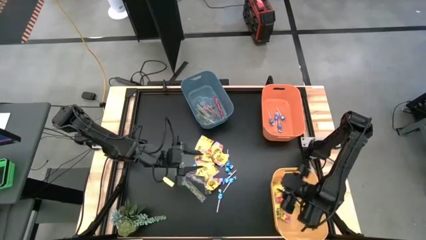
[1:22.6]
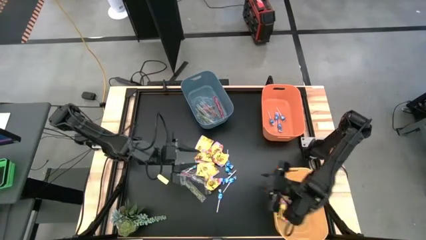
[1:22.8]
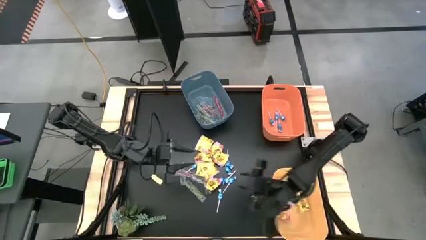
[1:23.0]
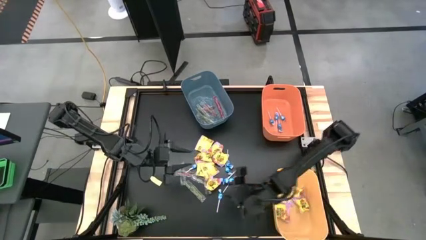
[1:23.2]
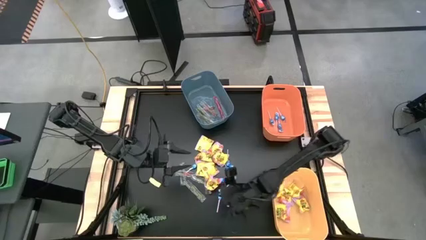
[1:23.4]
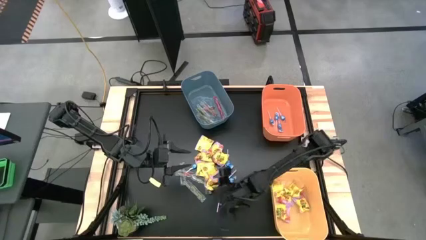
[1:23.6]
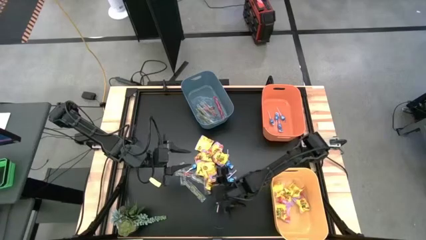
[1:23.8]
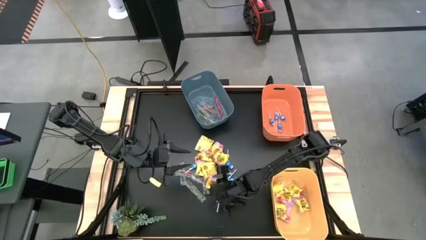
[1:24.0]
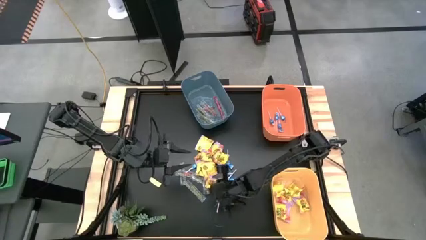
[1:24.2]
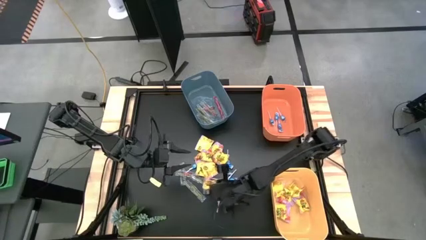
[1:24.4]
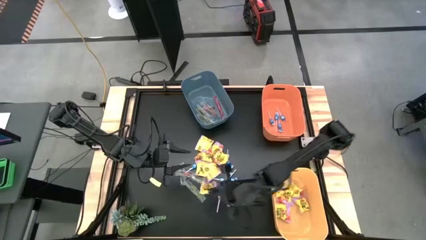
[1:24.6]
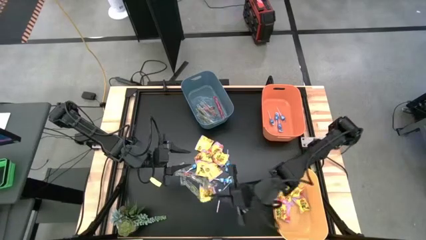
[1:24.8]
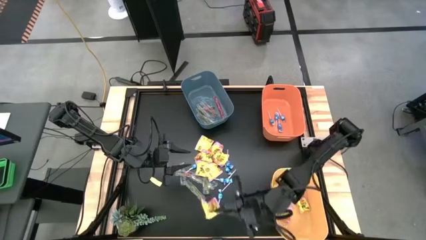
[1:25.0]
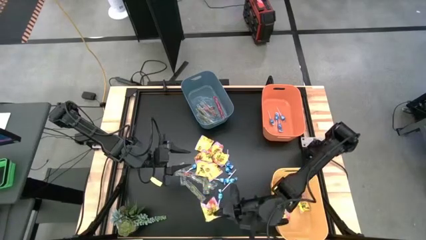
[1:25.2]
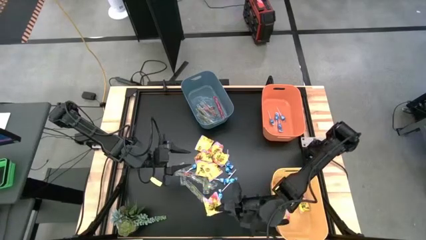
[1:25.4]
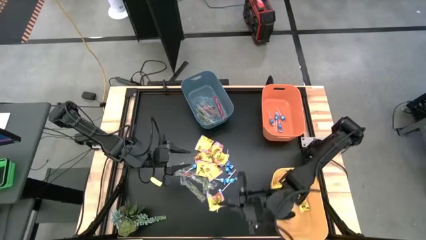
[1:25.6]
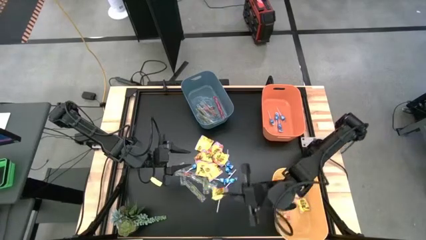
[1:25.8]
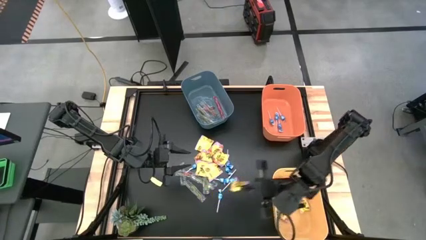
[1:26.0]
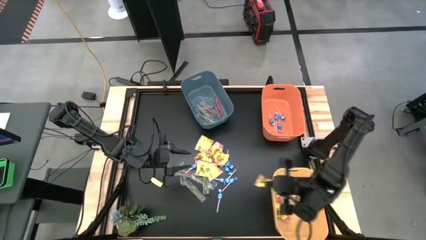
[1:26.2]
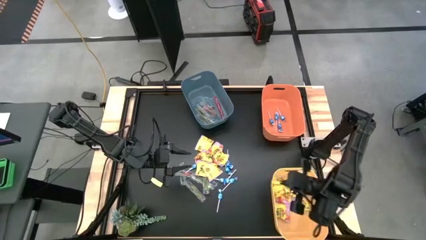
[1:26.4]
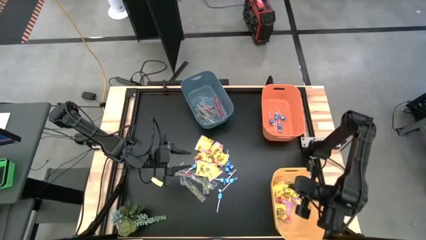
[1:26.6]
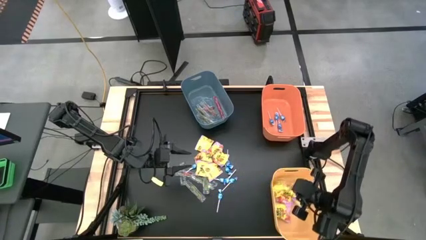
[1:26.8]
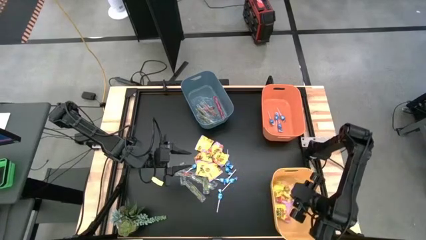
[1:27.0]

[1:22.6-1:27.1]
Task: Sort candy
Put the yellow candy into the yellow bin

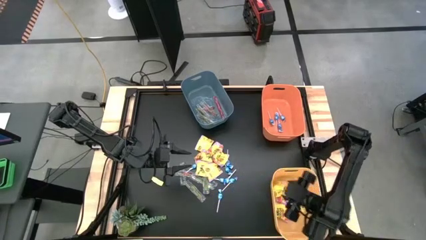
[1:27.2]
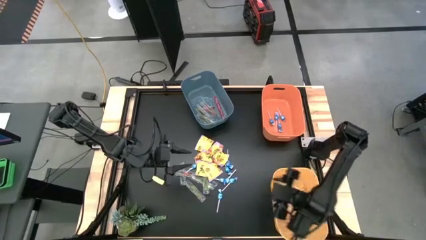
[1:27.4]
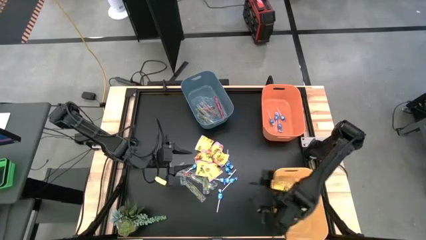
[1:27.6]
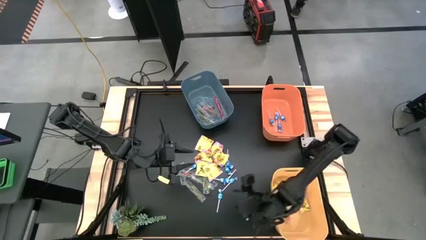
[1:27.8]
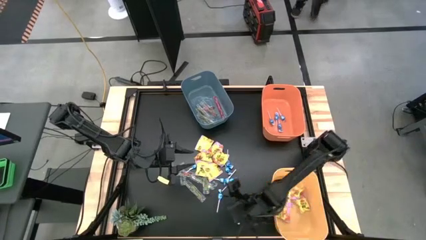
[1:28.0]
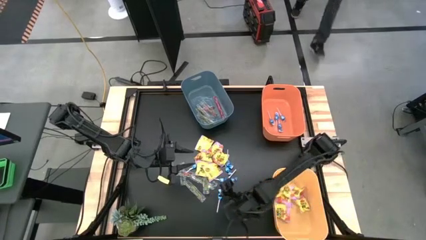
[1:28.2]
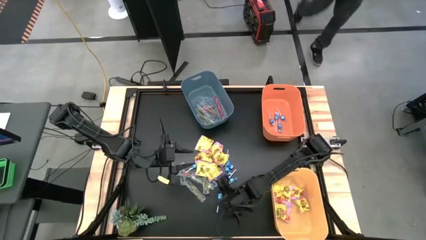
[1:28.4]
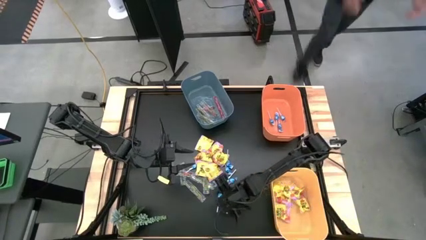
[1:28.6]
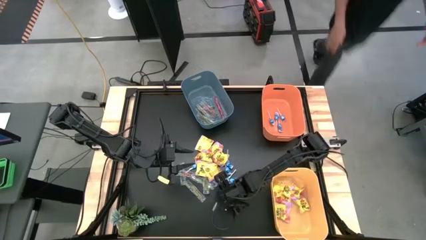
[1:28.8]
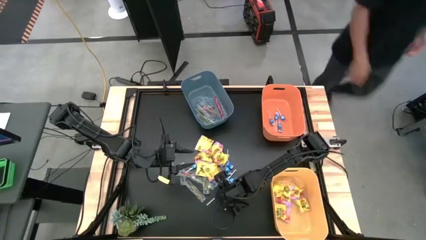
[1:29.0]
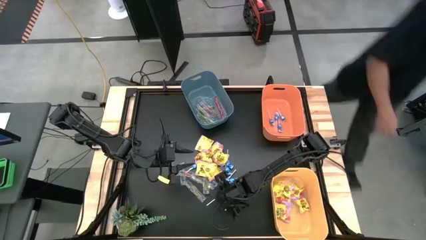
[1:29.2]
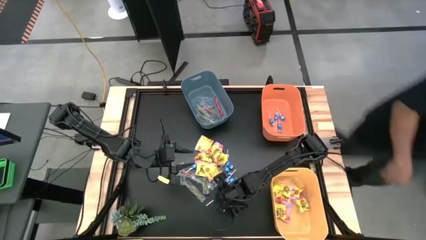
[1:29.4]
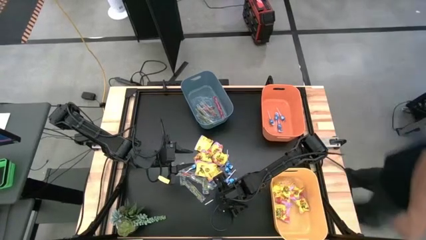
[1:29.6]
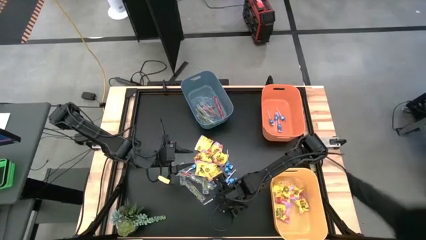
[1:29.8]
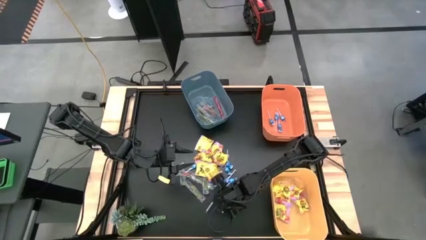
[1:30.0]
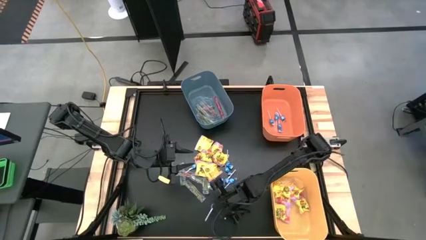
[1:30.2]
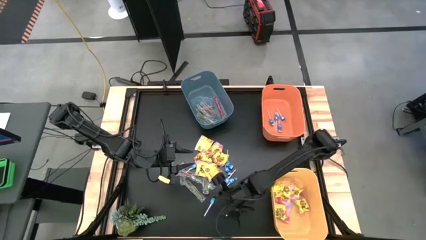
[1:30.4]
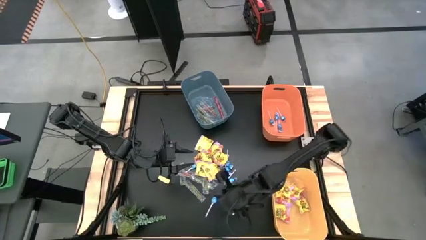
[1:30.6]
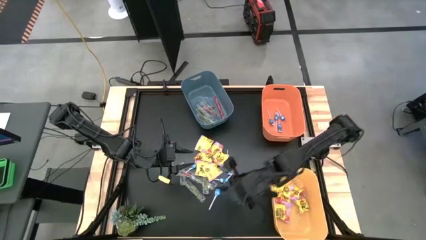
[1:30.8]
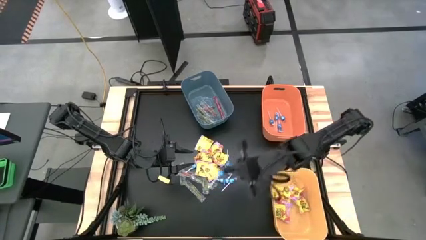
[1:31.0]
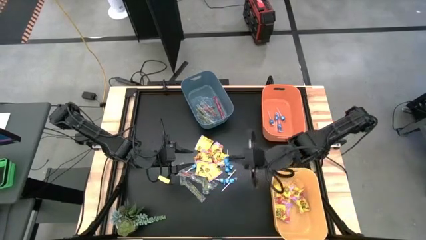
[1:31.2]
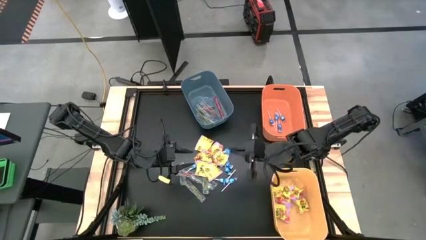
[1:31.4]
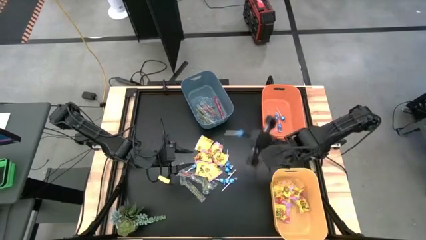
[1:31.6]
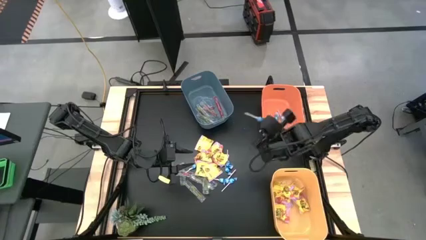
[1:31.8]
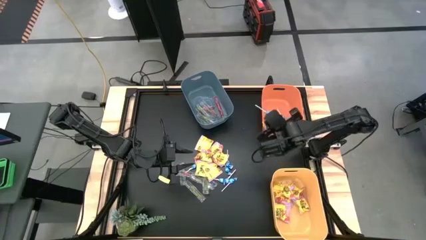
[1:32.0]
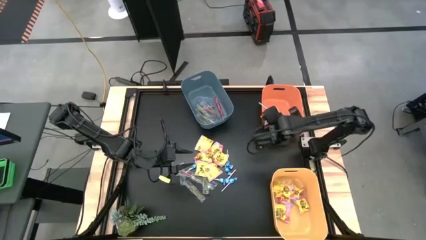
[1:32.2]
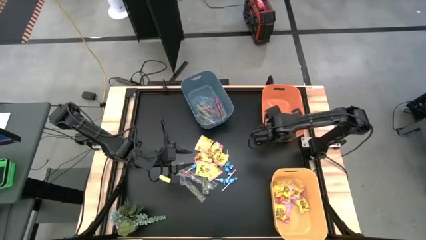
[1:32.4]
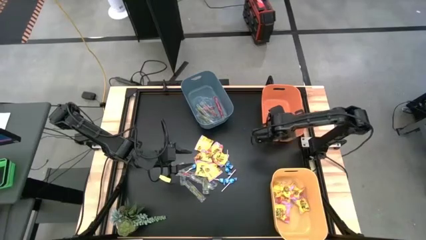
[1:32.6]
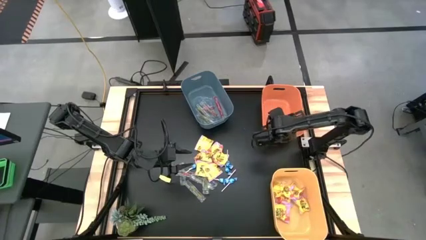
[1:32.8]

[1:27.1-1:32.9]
Put the blue candy into the orange bin

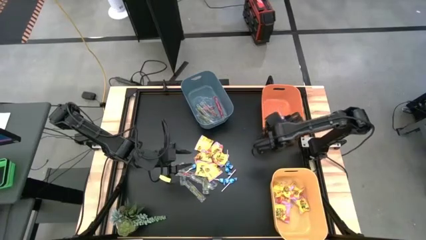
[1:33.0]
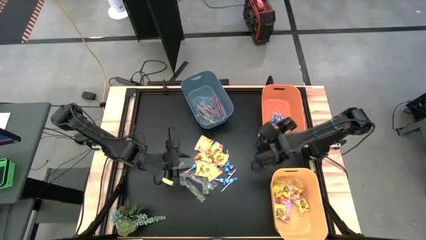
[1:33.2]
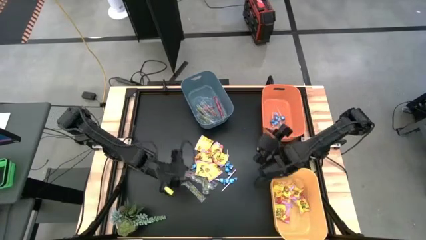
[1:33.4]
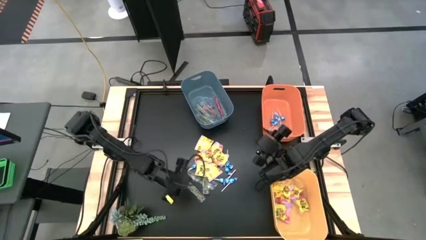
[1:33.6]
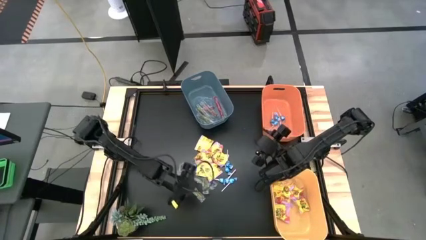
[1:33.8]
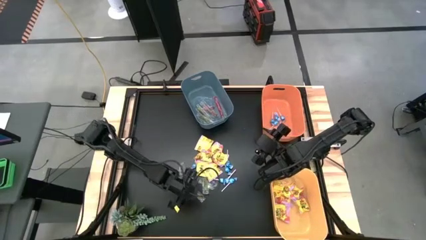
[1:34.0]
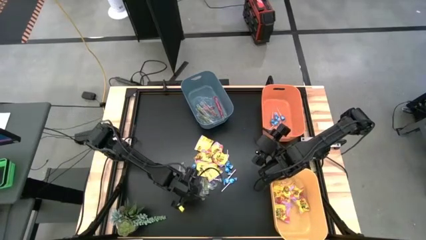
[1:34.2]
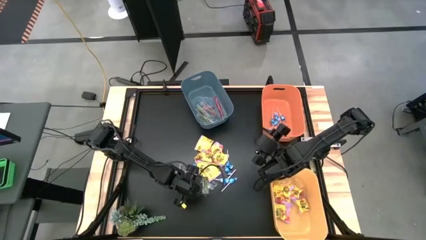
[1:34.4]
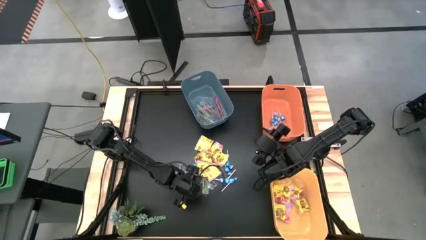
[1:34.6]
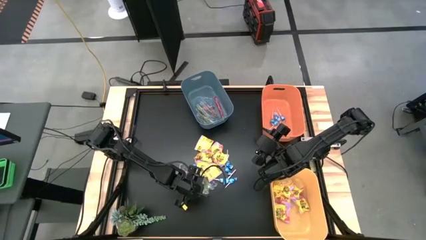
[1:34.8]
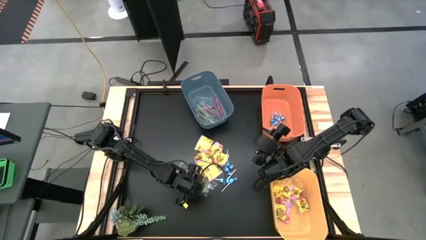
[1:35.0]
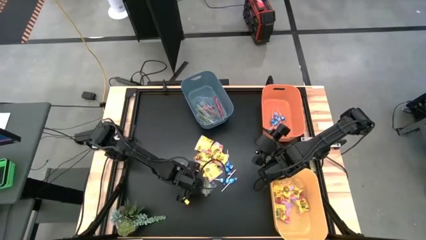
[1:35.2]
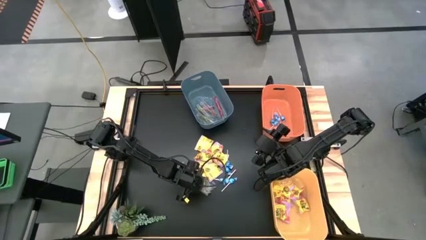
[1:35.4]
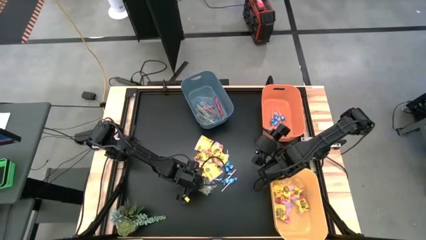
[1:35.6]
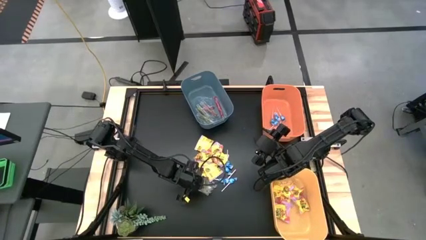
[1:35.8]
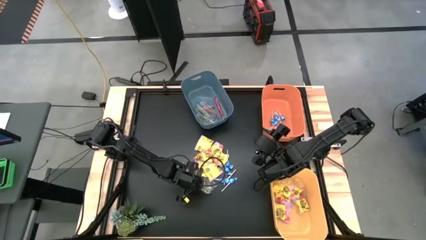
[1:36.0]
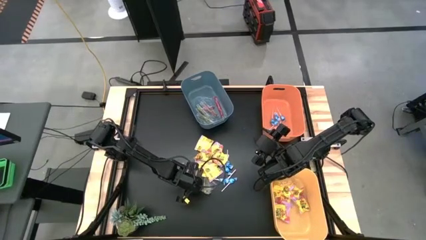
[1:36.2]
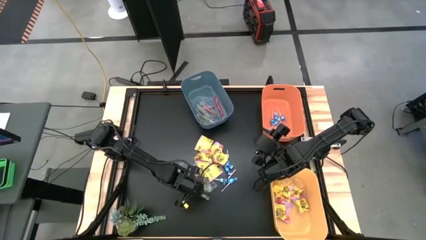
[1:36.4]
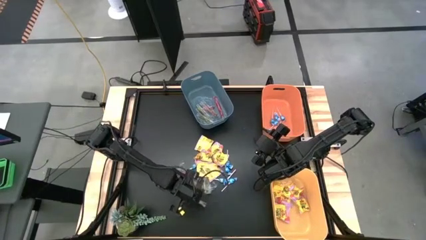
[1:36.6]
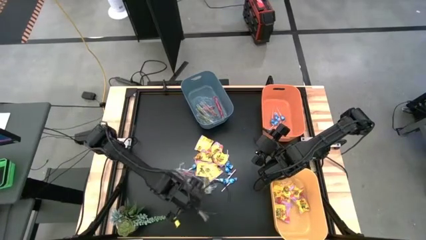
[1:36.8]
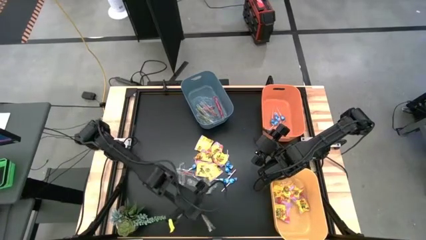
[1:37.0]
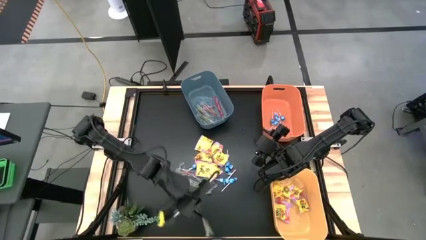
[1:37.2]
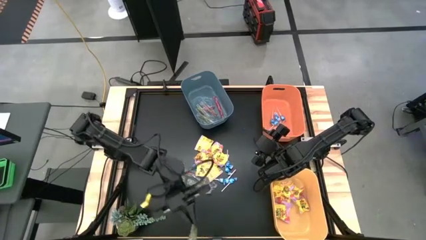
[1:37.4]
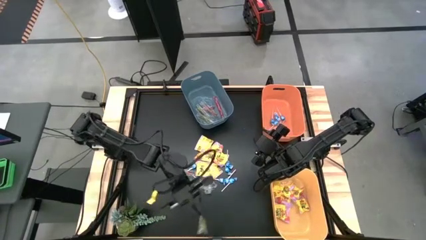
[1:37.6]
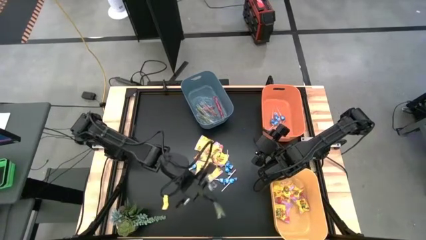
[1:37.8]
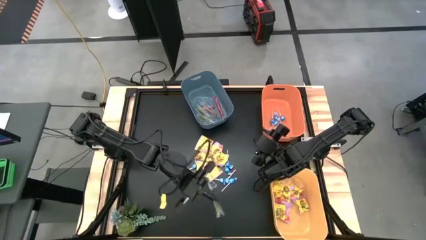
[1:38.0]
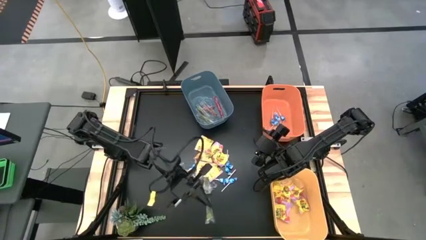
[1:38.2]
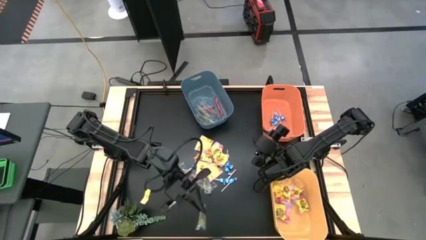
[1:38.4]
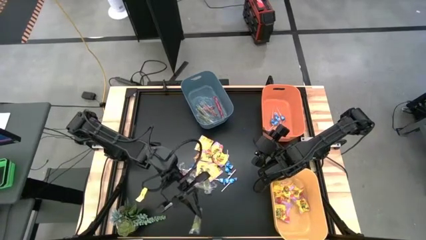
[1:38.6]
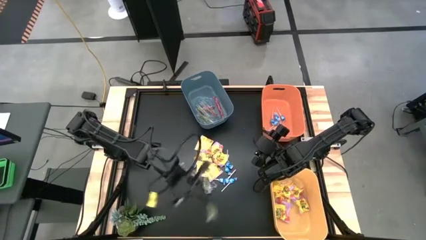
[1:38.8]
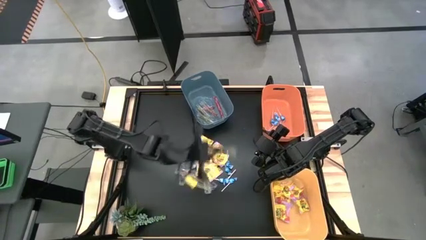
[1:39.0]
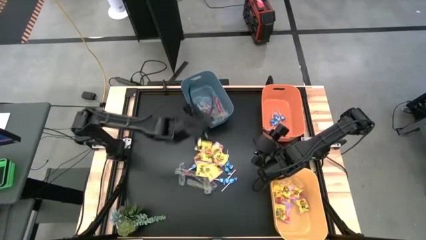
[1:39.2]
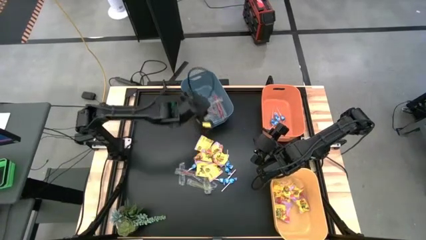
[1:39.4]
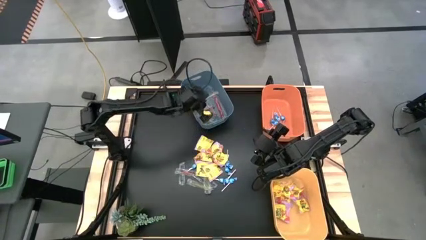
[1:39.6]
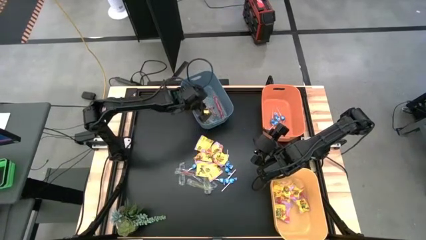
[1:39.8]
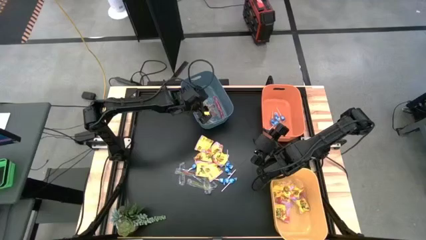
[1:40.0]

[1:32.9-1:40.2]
Put the transparent candy into the blue bin
